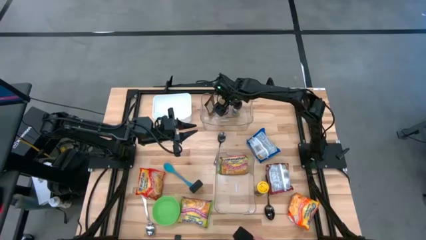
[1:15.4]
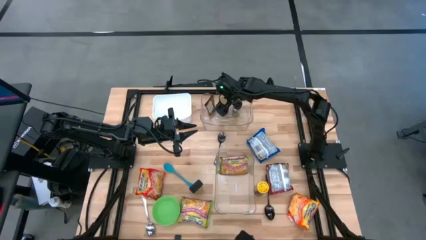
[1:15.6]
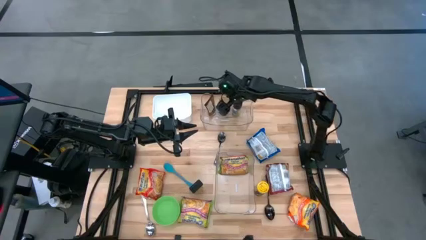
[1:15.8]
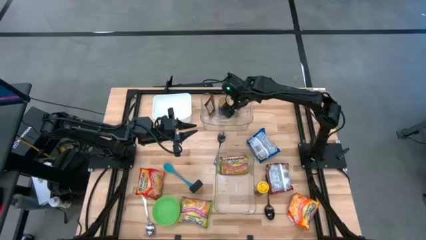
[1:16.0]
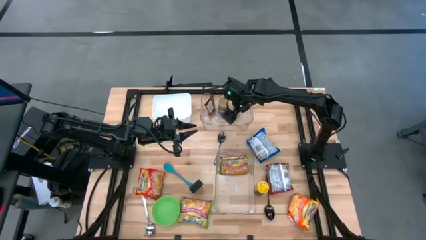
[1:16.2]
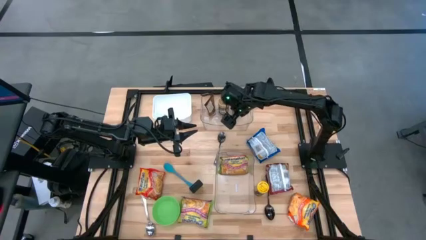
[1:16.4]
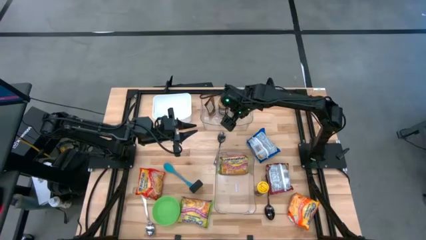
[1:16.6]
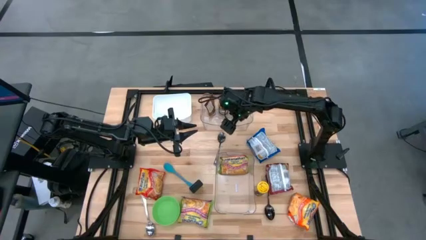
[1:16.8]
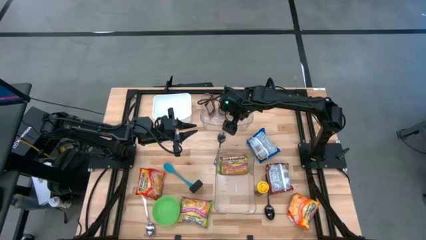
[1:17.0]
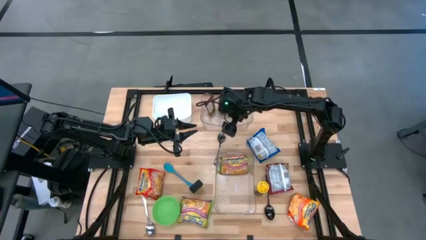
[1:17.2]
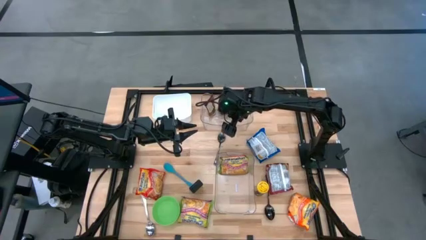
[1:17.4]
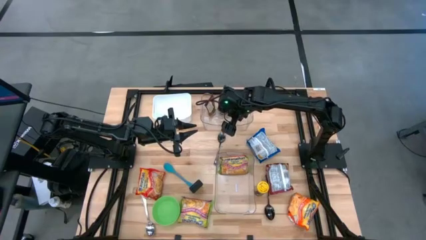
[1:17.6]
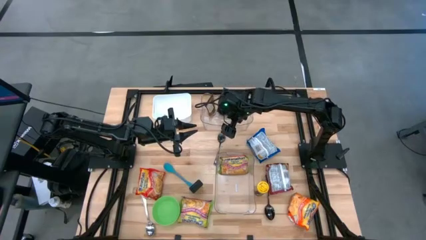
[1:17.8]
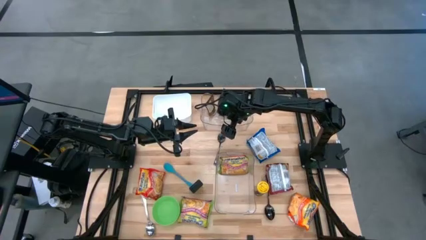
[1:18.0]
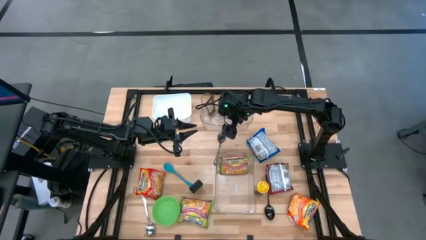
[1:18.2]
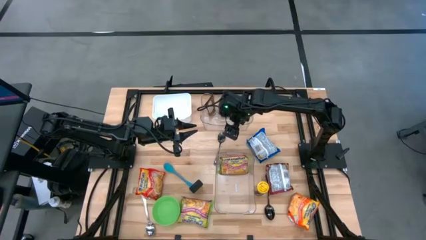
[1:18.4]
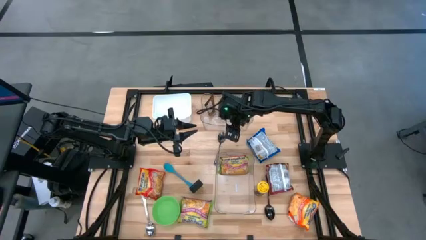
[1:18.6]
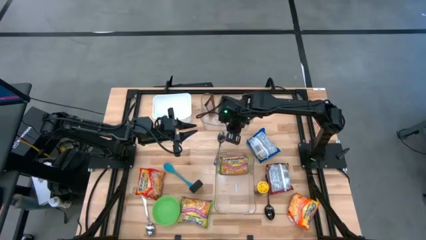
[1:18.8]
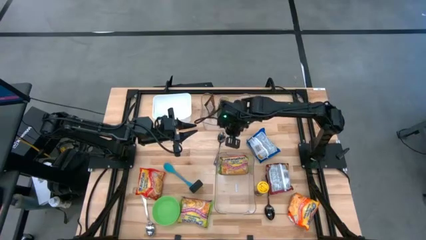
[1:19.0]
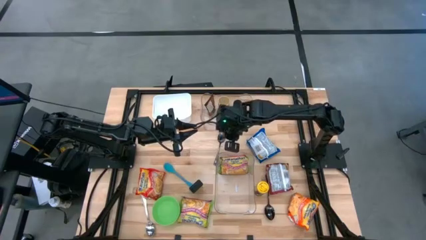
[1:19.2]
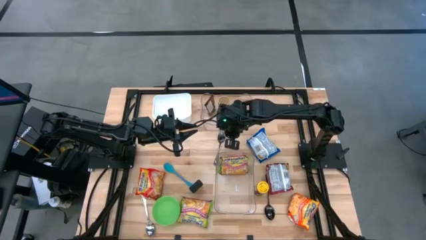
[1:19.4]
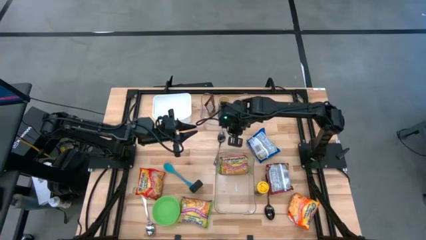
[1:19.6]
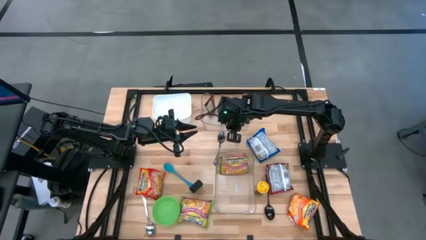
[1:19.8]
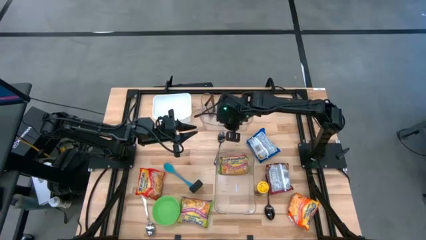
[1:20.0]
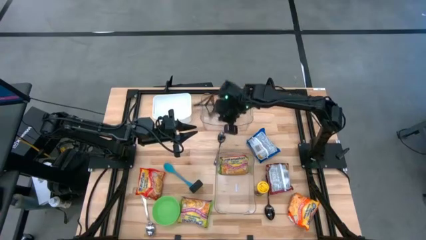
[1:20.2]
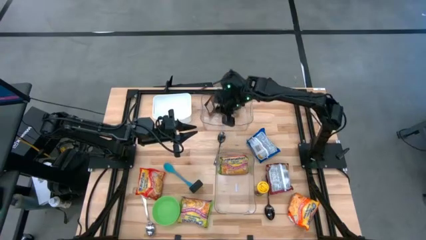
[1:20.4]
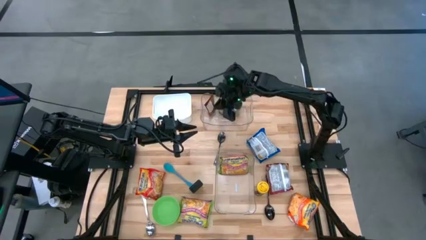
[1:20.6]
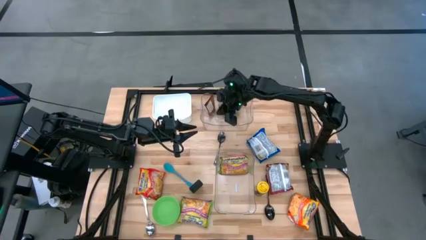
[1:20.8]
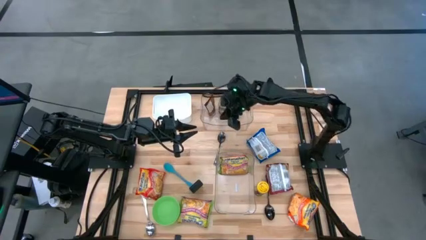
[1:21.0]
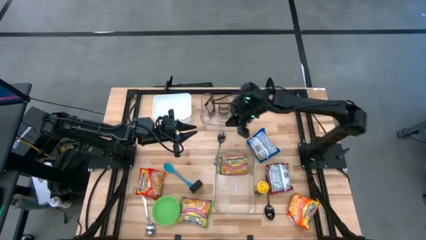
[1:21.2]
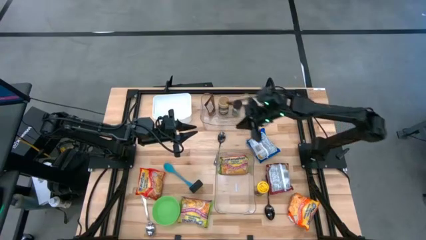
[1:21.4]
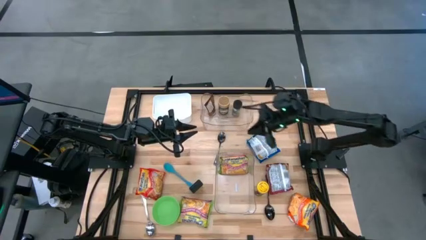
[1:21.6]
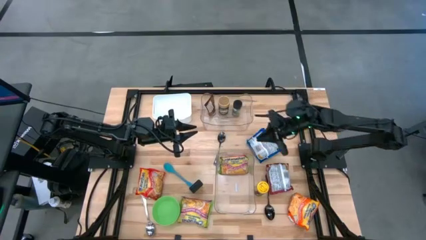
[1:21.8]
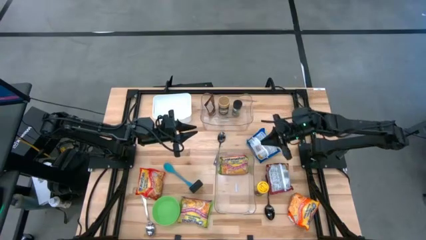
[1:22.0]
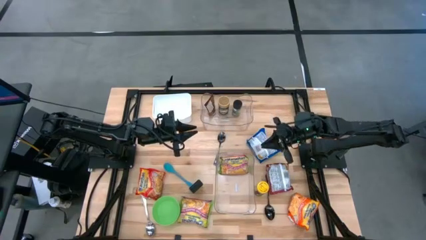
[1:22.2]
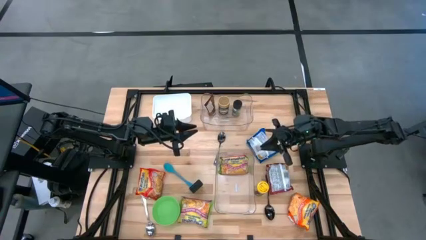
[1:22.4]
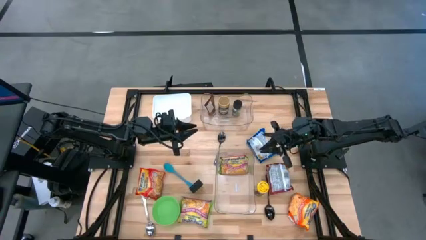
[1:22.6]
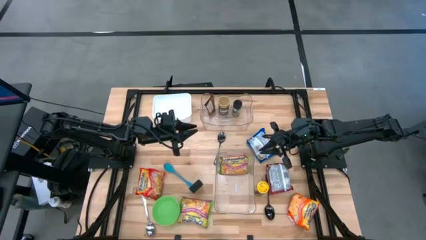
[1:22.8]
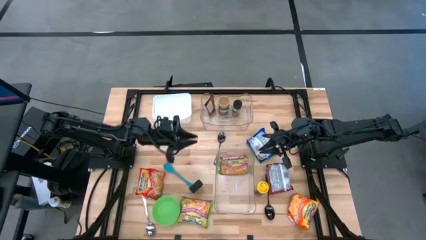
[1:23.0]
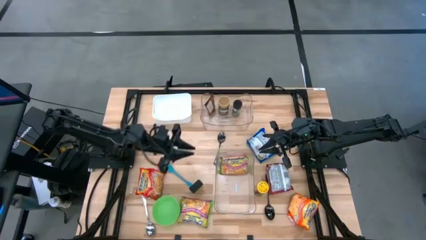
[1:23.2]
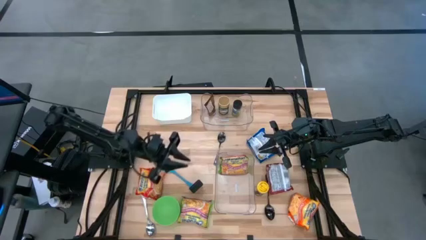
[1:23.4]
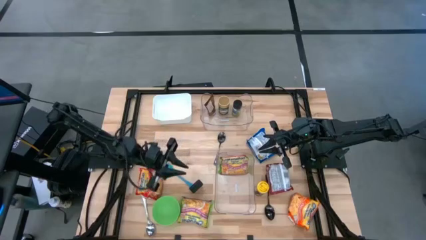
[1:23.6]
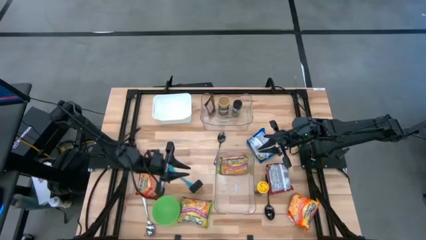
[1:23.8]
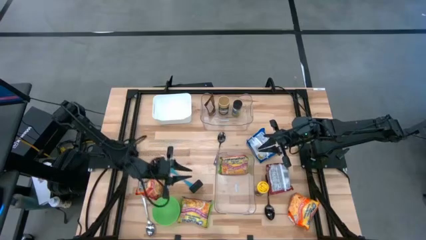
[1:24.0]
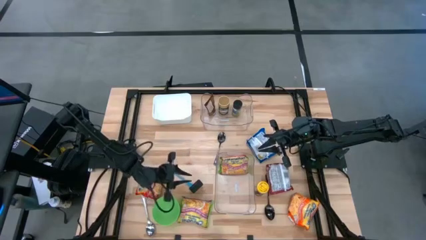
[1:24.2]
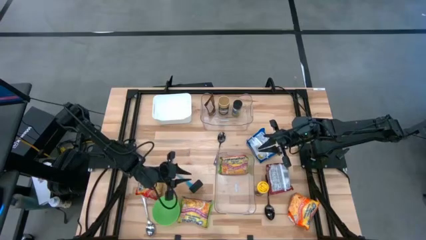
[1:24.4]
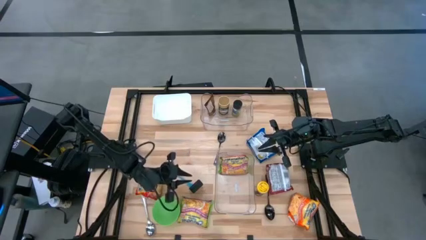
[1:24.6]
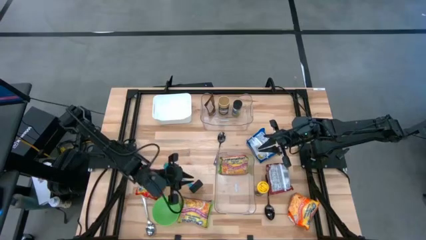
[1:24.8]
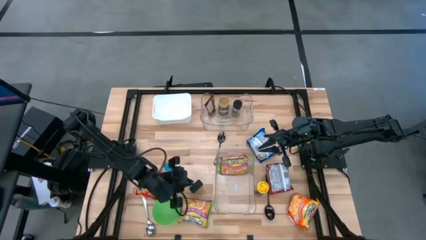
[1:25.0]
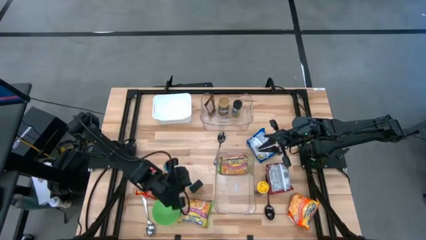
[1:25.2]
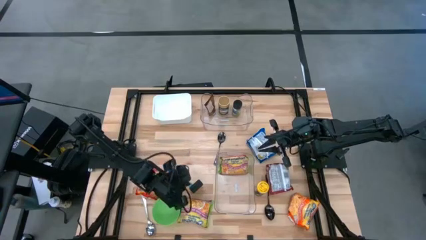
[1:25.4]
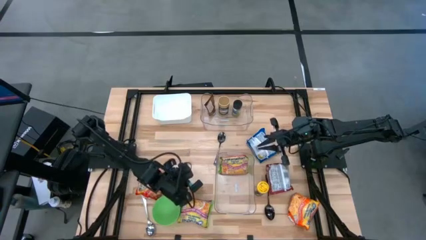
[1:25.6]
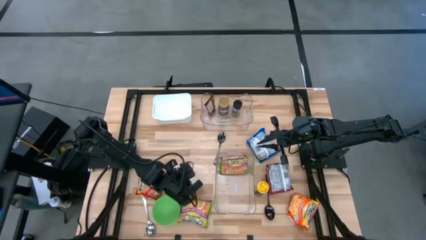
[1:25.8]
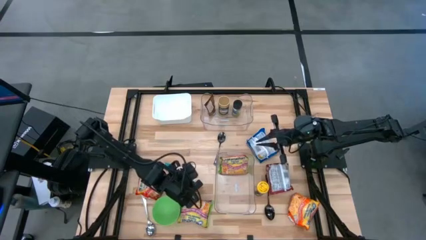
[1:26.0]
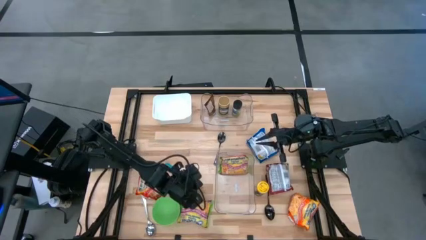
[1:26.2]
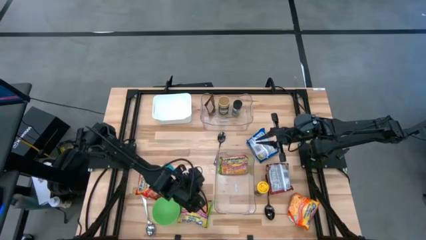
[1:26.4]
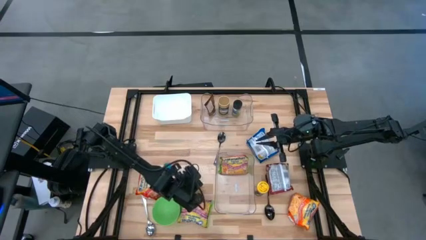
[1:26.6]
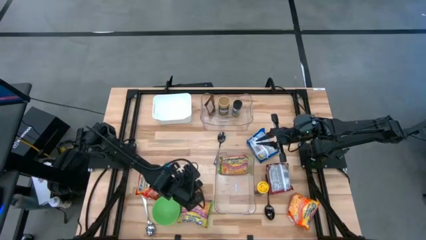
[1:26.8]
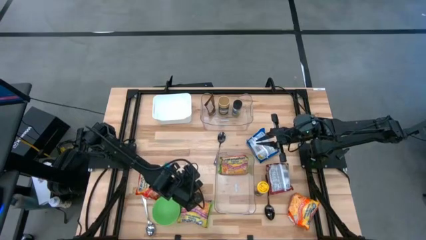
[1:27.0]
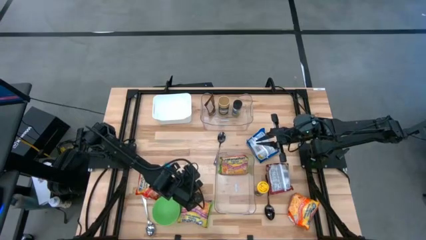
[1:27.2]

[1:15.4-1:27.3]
Task: Pick & Place Food Item
Put the black seasoning can into the top transparent bin
